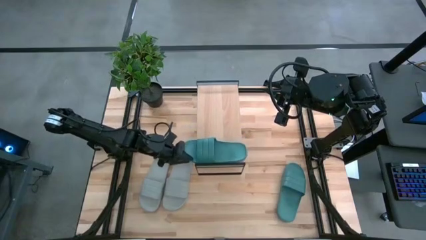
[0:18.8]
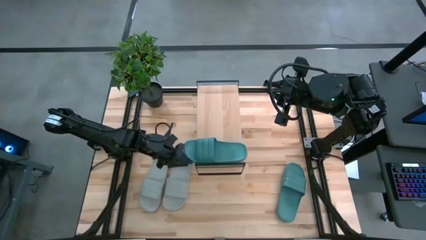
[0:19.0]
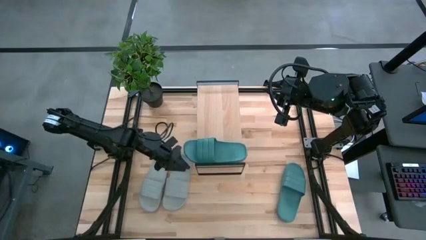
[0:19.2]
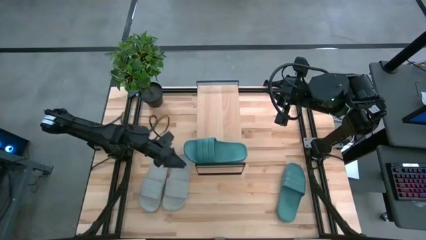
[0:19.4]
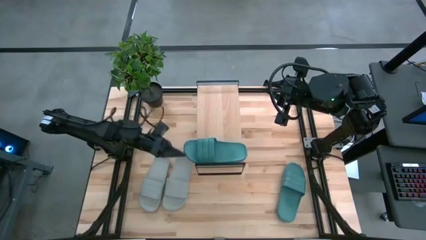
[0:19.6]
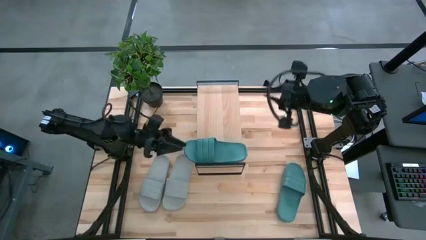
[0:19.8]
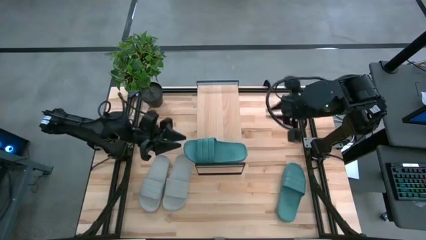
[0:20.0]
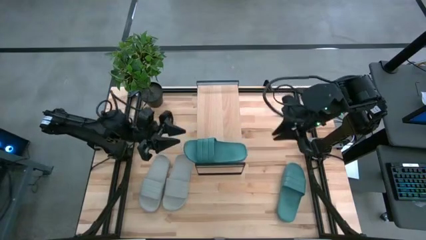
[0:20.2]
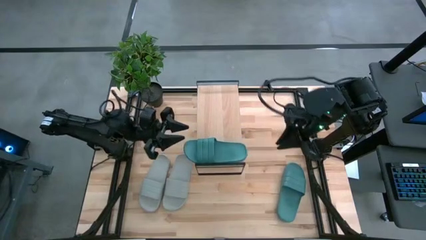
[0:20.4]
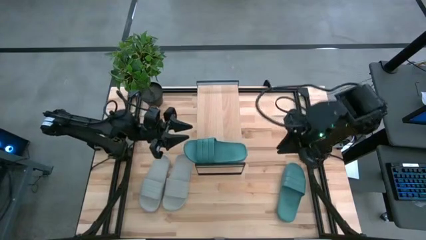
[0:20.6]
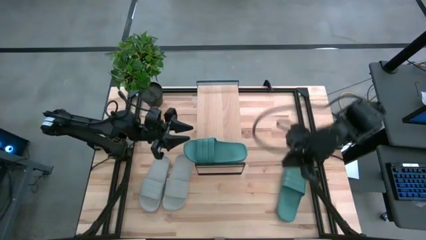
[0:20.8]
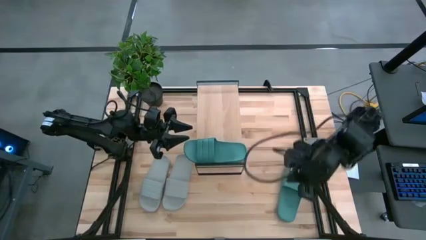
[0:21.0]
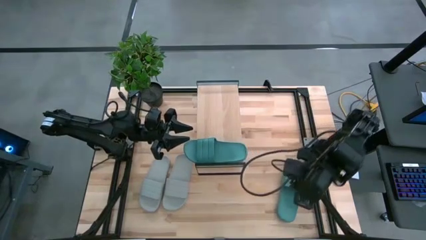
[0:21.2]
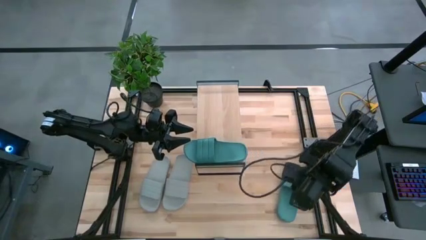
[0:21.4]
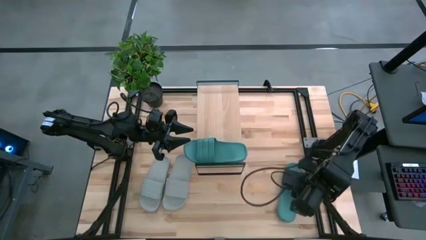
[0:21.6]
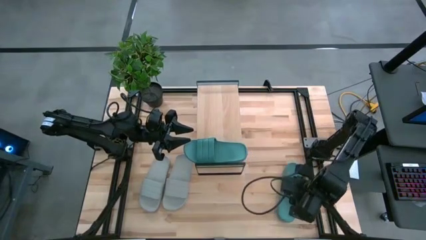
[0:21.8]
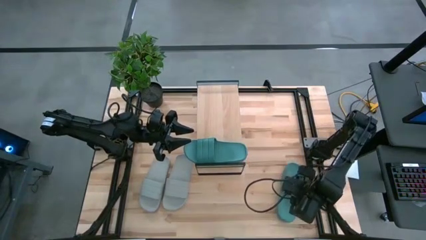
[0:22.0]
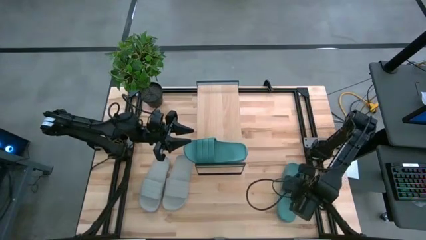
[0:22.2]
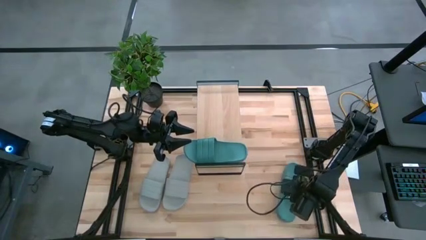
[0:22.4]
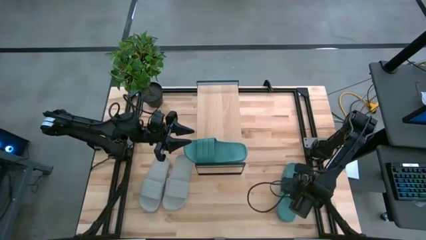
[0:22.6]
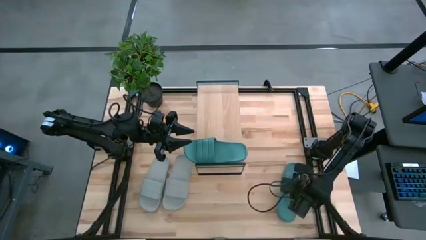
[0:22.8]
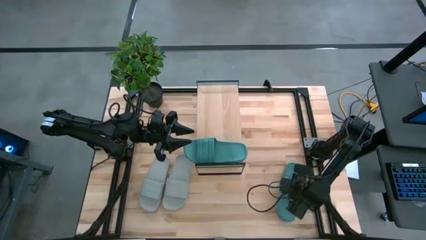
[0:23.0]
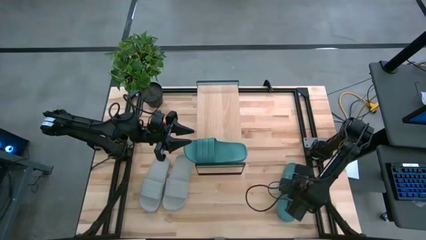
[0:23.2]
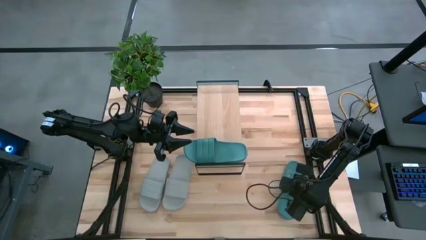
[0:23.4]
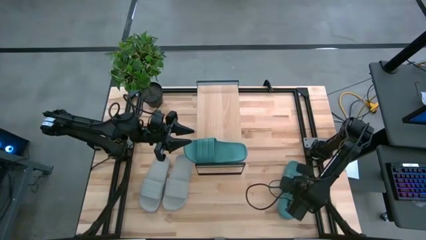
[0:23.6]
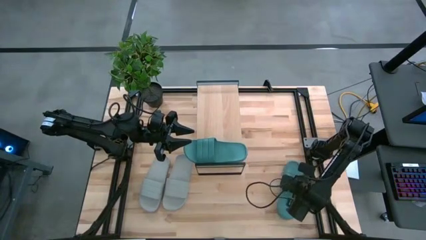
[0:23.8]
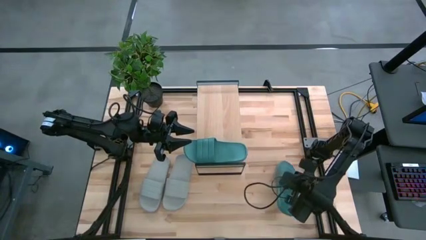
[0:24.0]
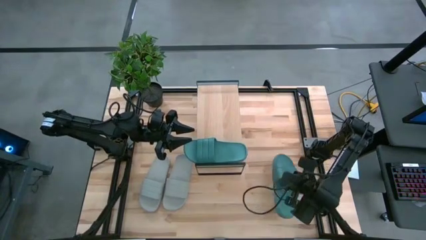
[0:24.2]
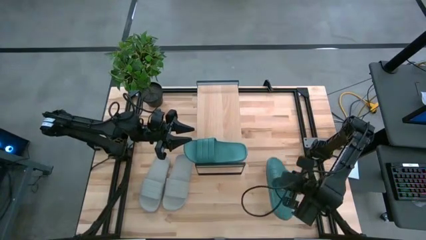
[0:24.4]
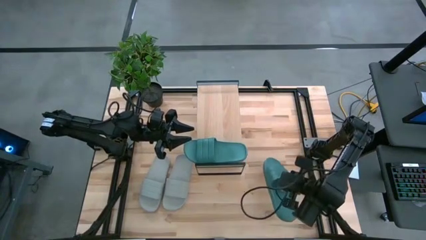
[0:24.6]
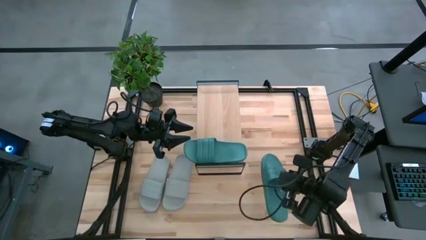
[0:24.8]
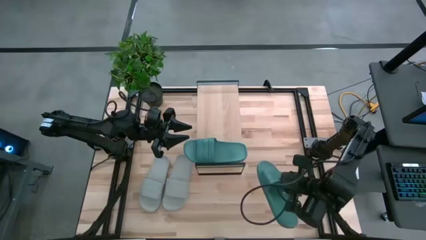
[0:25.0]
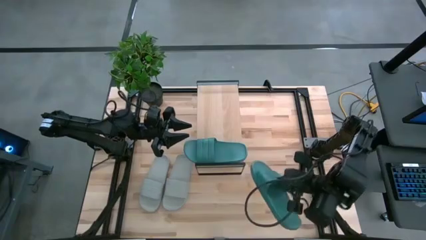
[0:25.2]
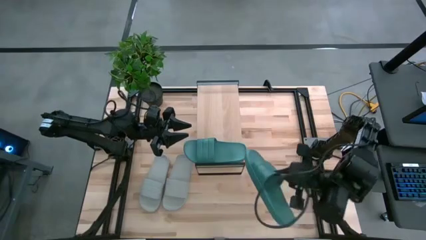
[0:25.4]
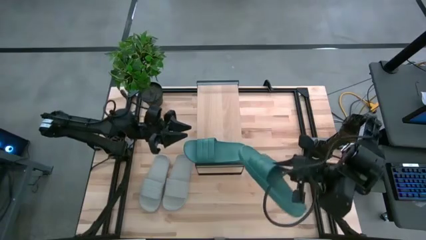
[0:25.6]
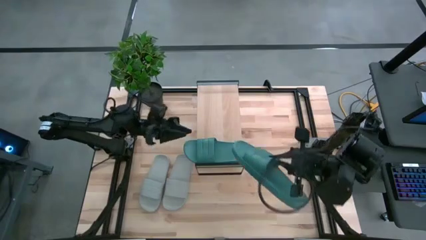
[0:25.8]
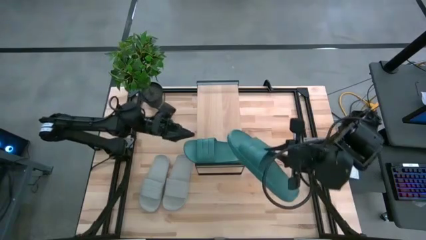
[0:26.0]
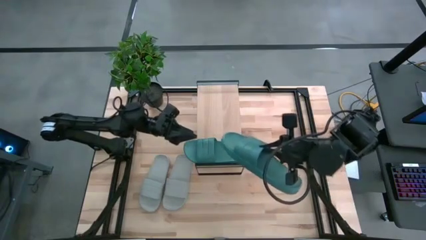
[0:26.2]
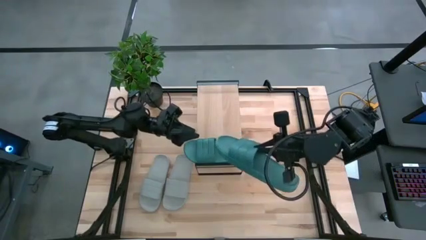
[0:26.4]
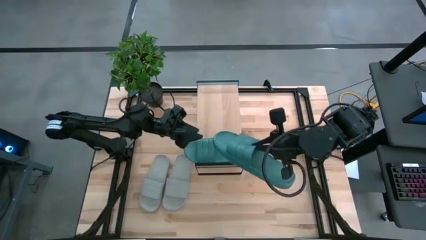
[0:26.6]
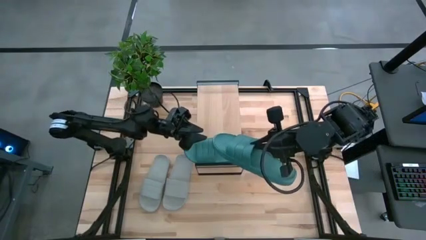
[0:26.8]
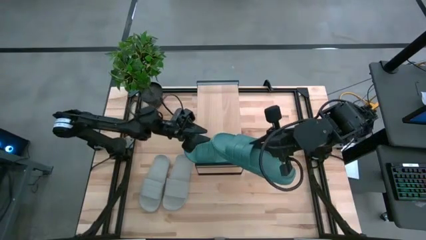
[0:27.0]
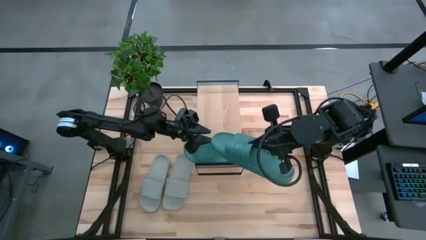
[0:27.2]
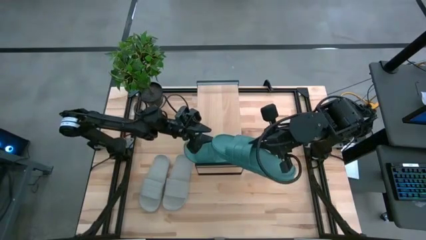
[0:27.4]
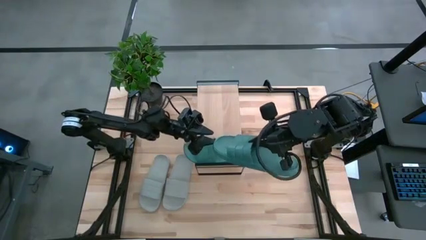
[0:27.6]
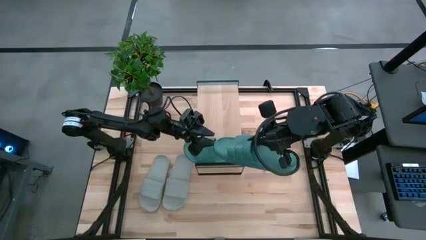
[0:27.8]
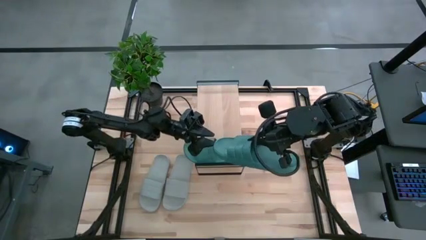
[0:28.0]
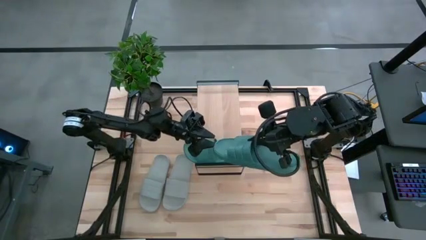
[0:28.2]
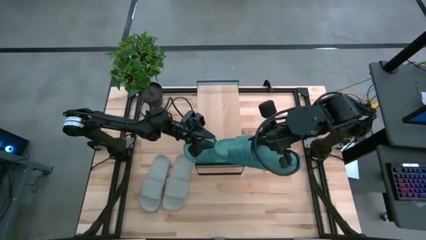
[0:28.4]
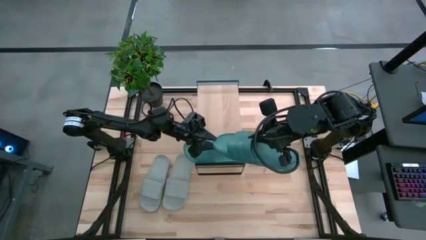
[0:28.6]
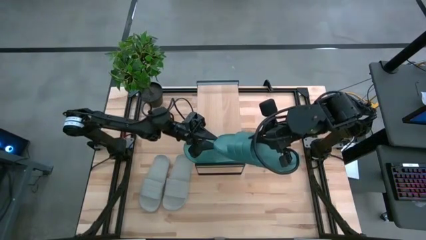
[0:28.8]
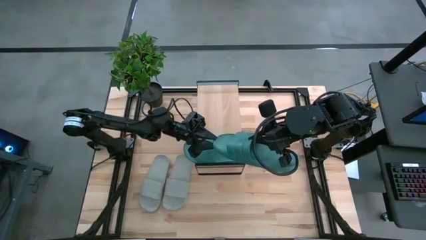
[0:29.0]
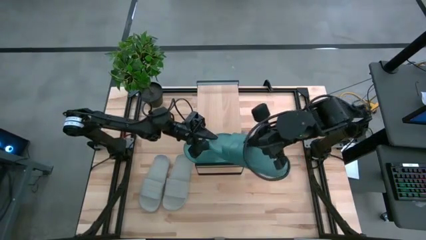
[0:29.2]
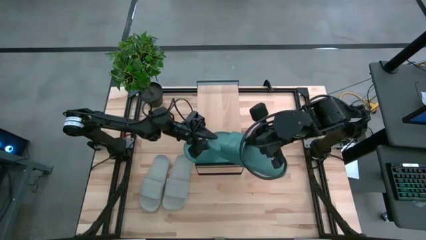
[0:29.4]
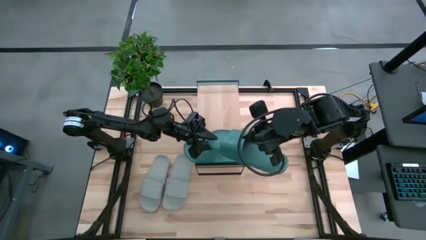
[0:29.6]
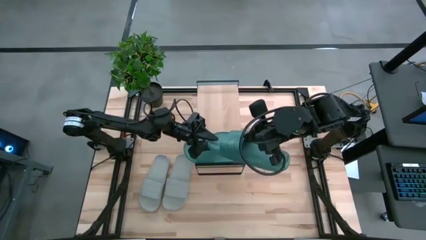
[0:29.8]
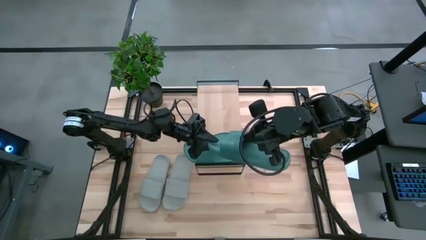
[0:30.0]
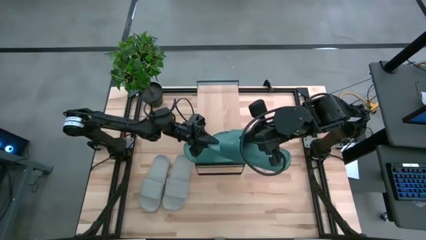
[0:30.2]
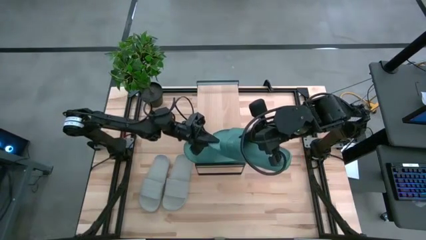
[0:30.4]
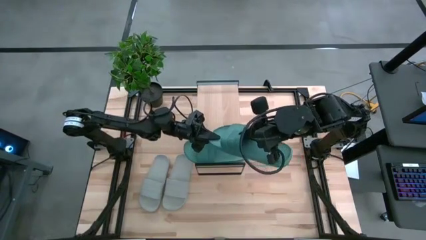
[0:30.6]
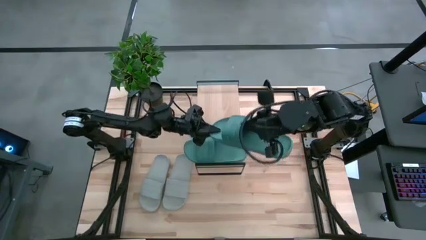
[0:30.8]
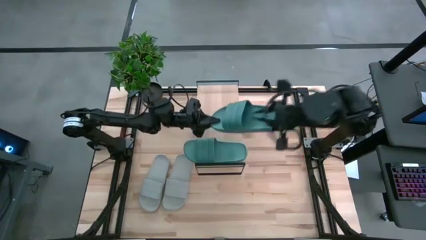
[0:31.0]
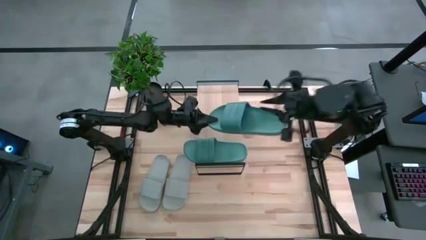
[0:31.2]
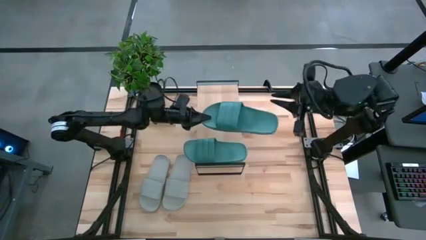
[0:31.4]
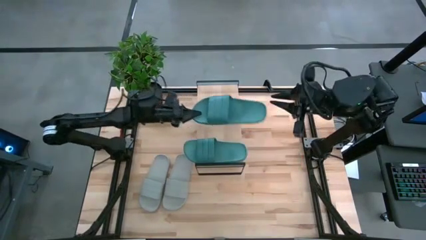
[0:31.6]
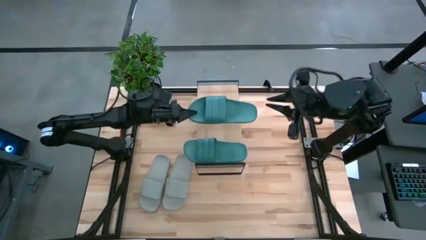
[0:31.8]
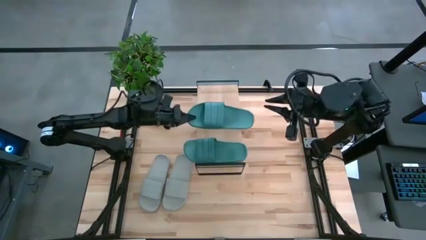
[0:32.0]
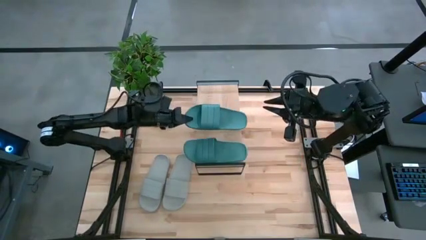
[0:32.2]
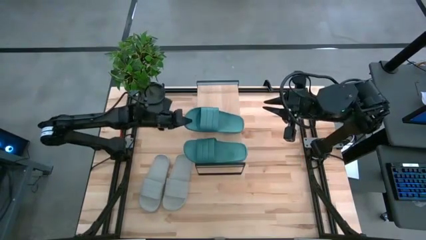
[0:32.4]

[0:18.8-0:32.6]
Task: Pick and place slides into the shelf
Put the green slipper on the shelf
